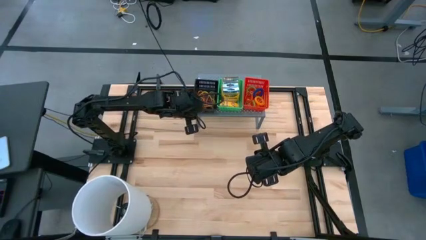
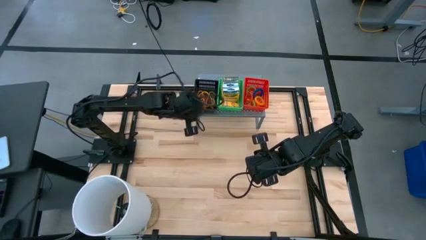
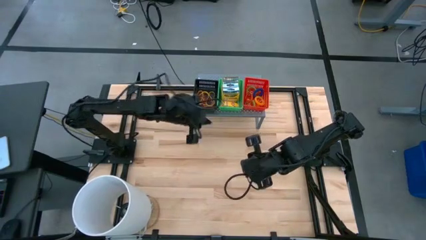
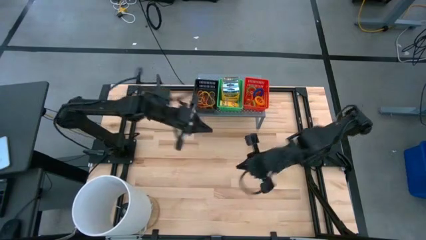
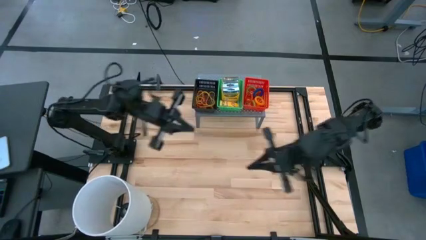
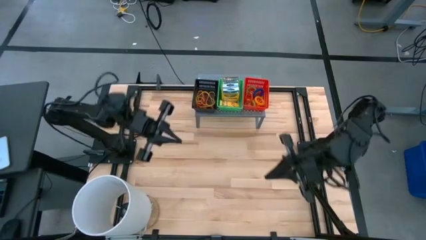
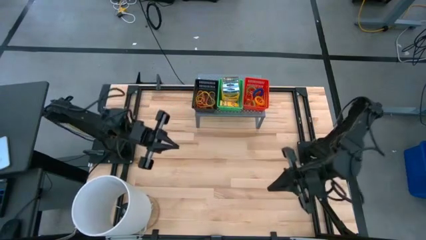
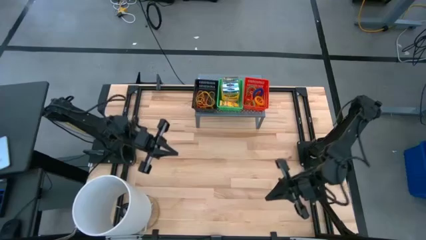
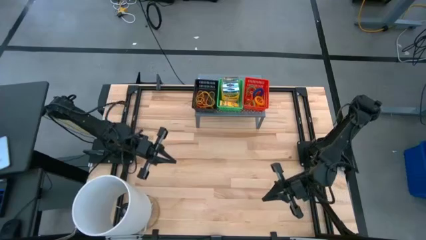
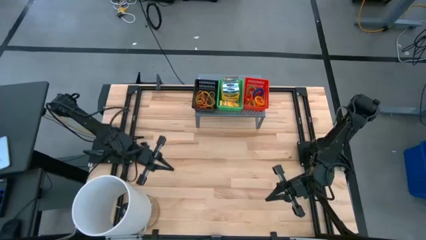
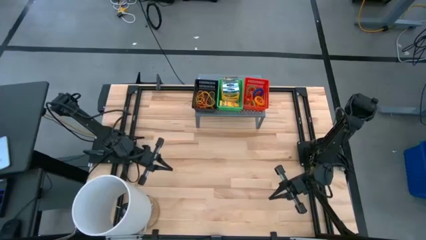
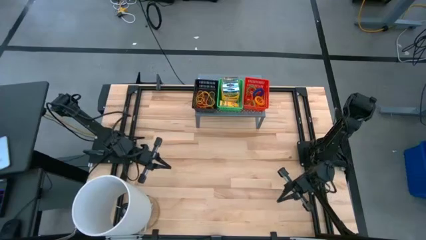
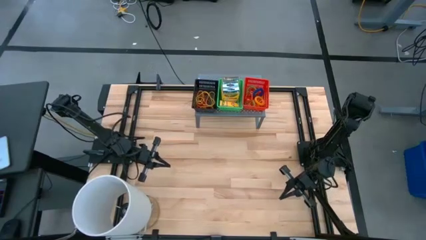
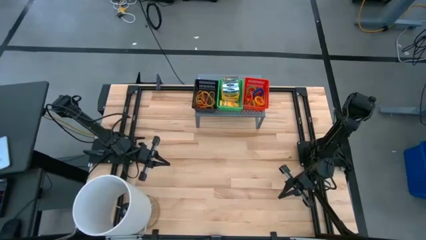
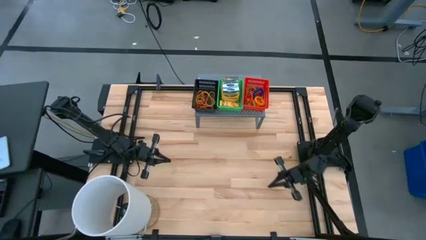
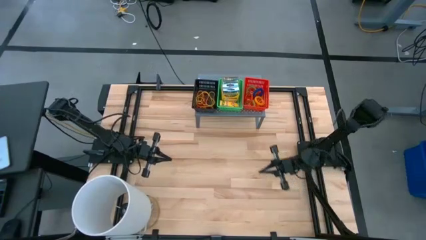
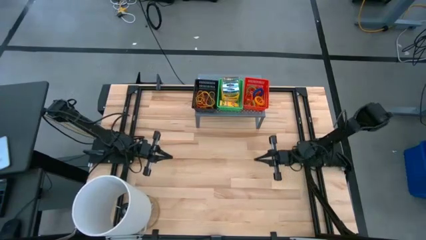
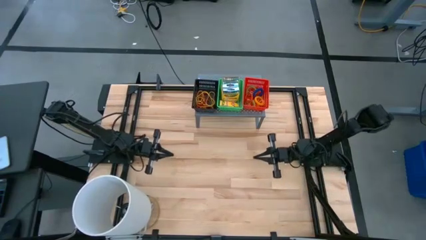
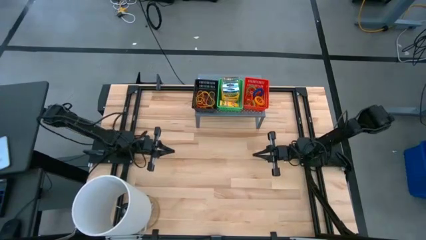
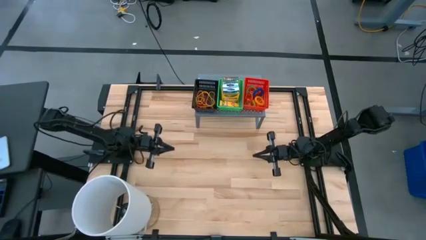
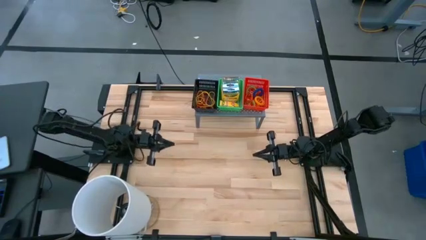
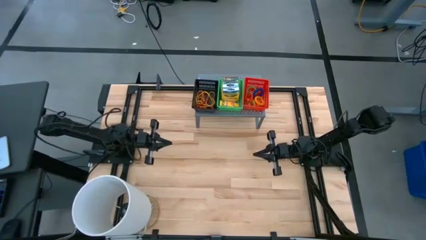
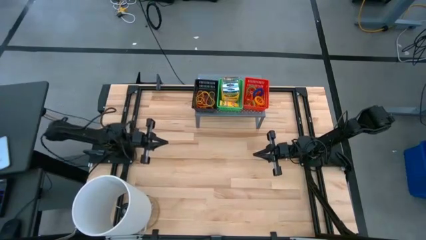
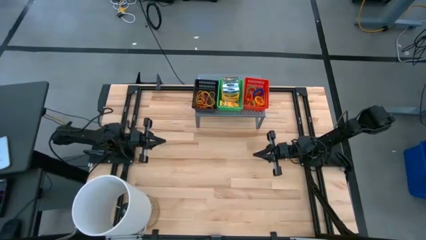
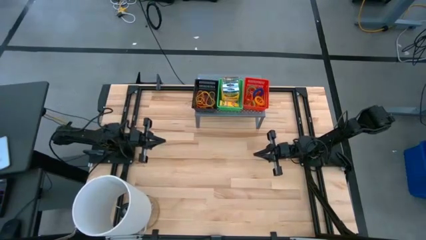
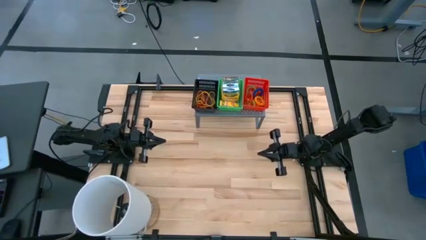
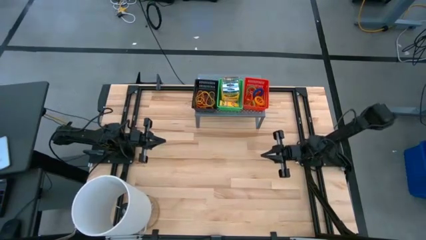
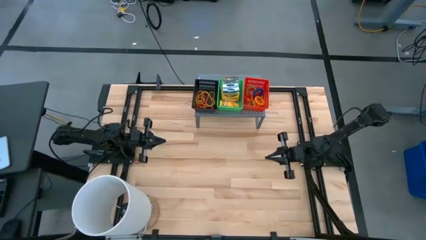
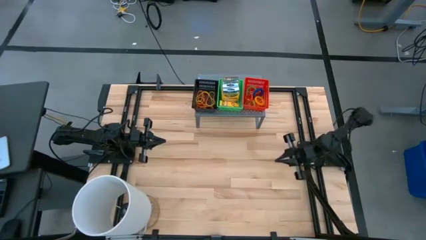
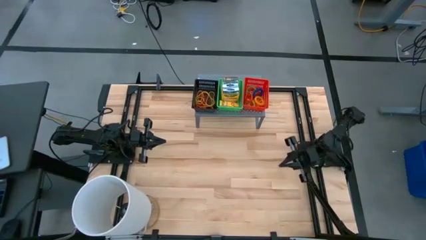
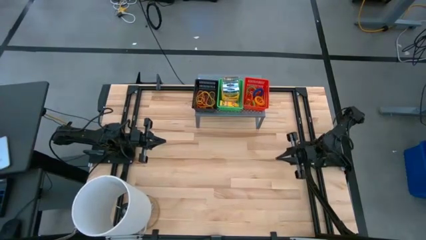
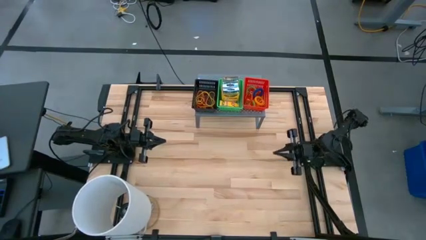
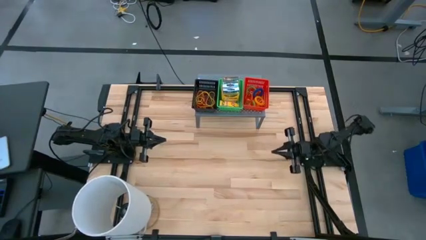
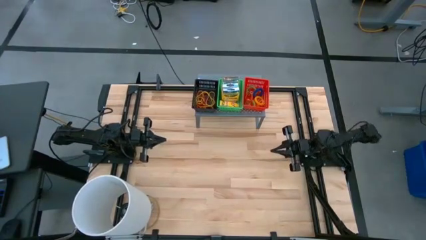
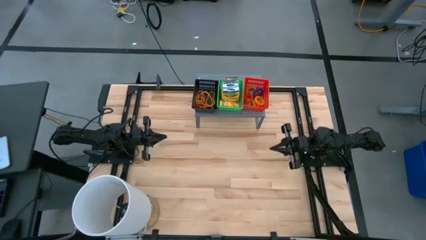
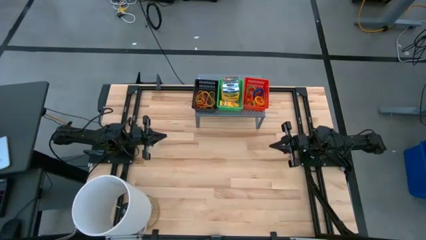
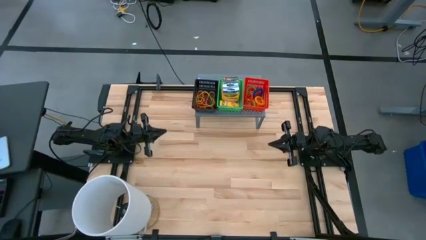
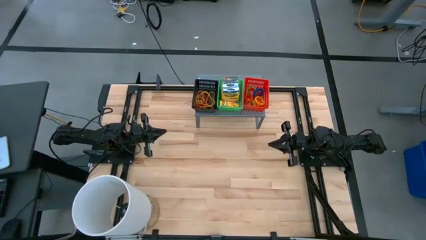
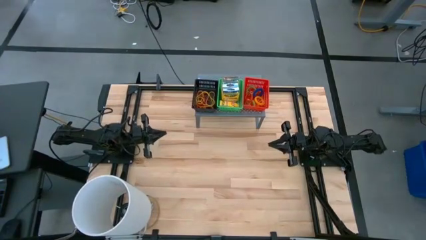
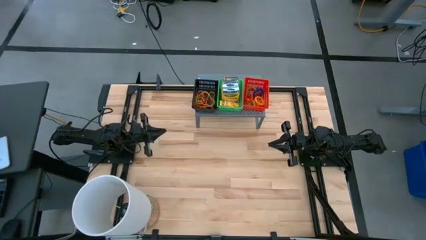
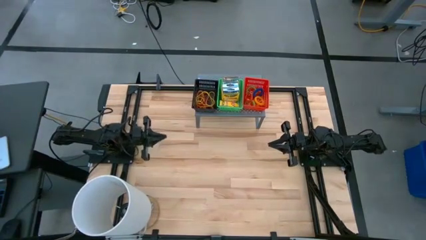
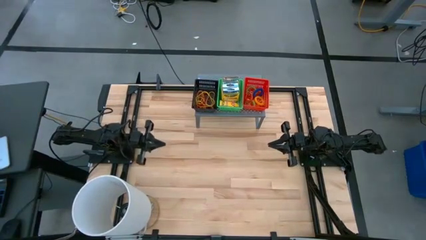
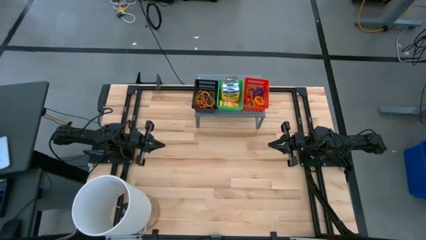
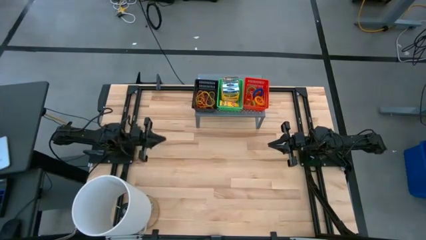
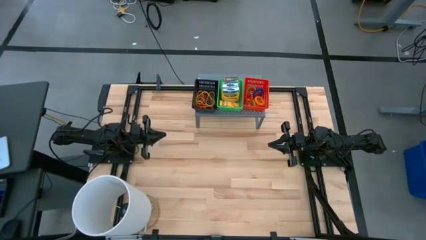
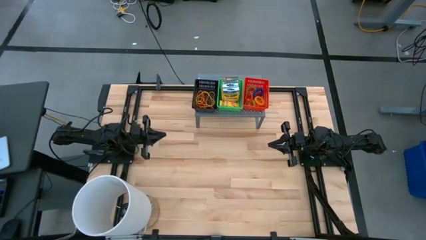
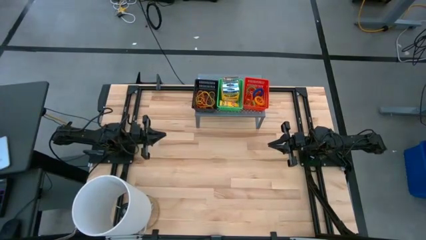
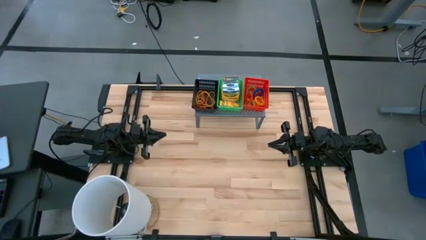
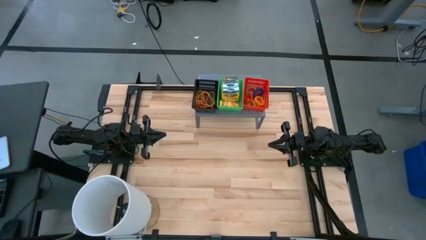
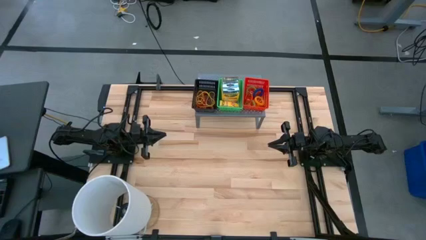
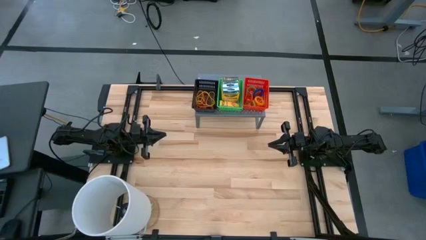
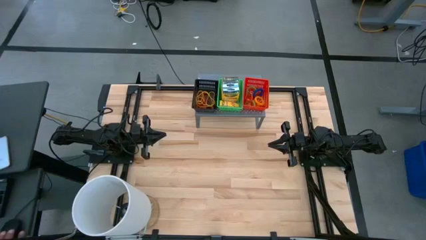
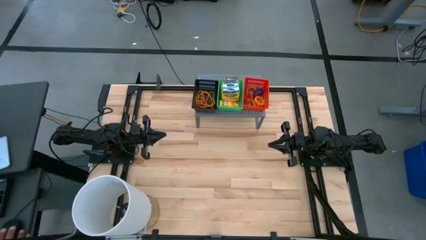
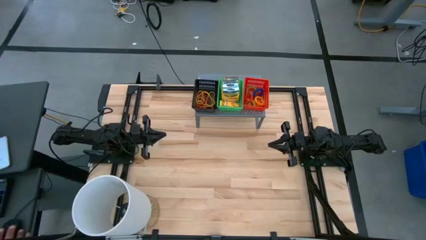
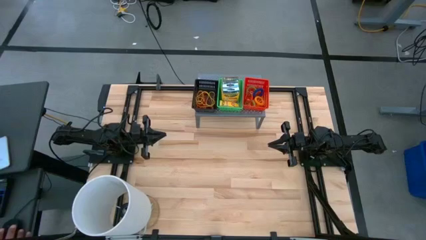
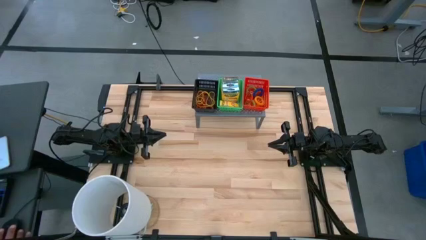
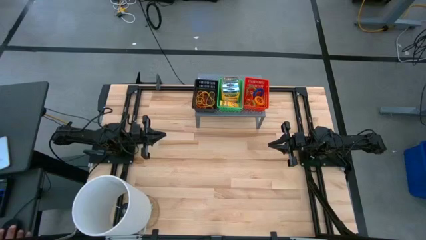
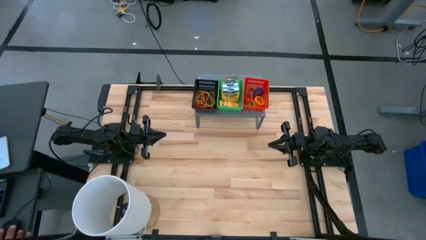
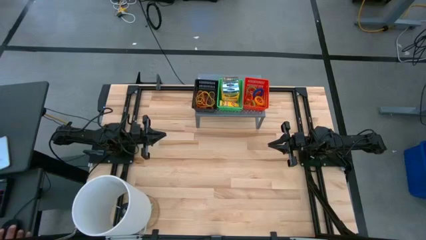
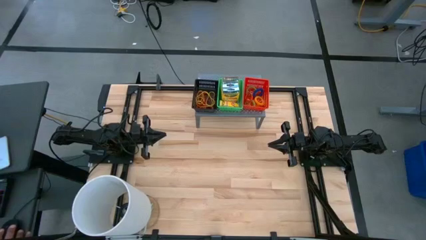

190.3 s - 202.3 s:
Task: Pick & Place Office Desk Supplies
Return to Home Position

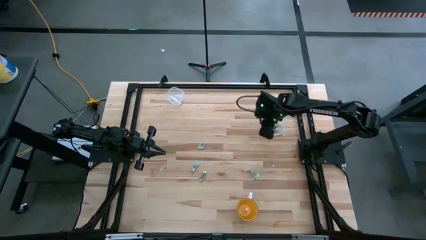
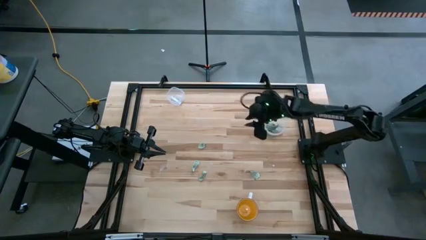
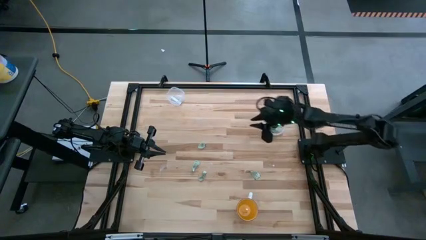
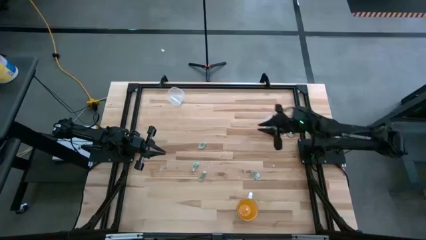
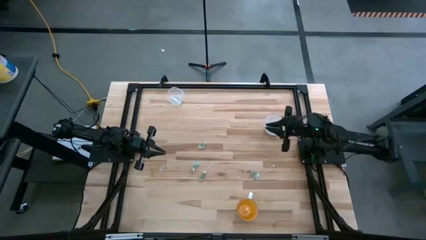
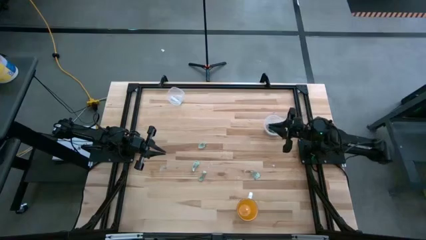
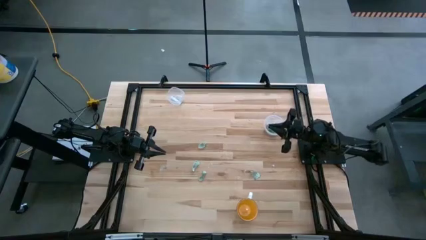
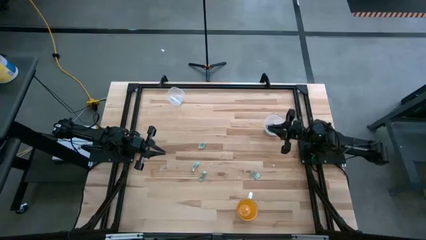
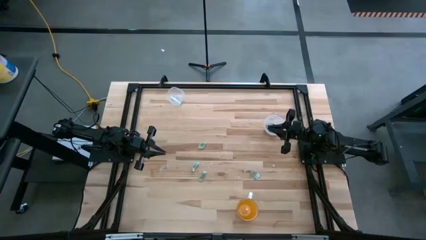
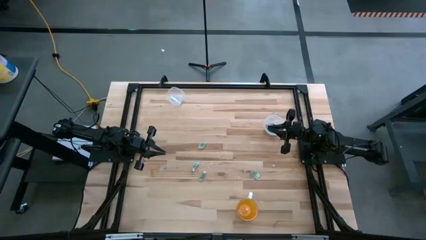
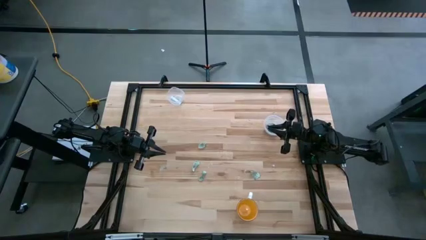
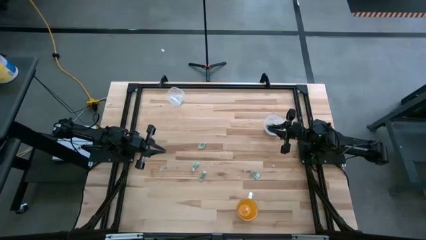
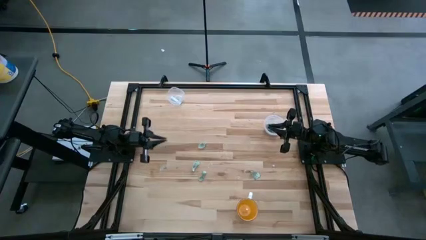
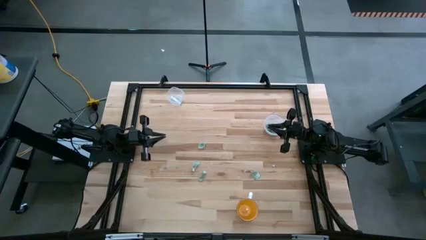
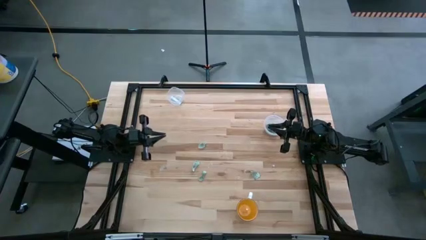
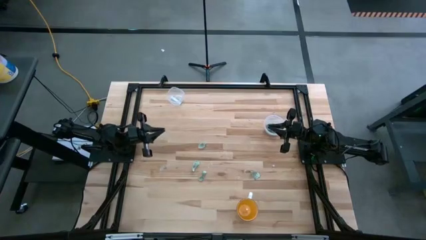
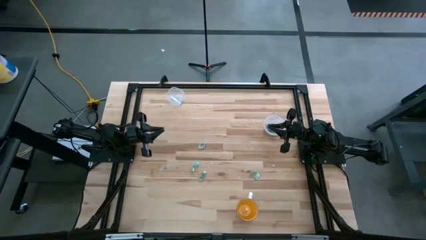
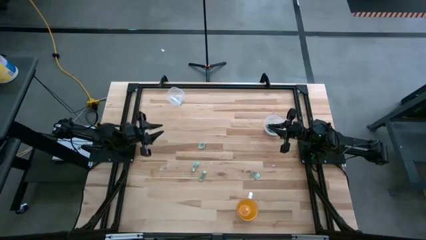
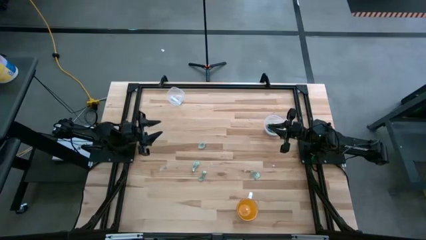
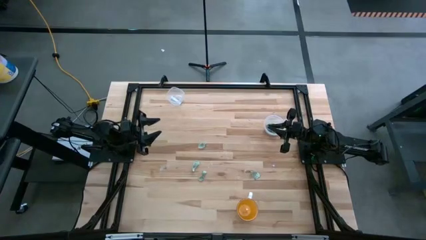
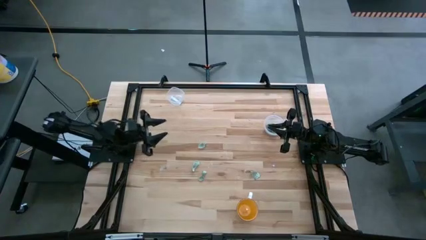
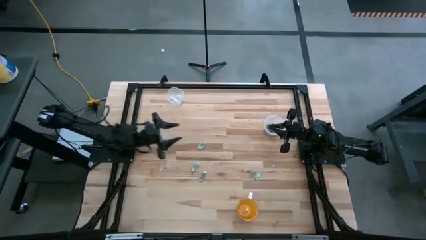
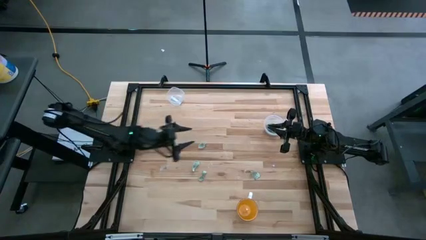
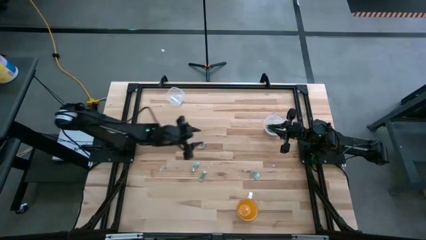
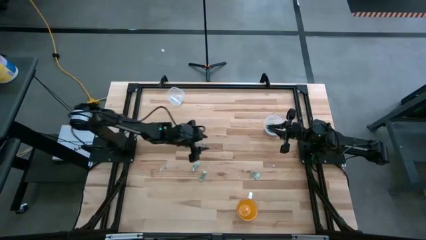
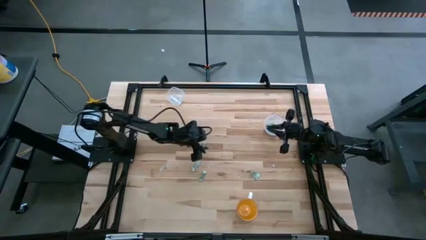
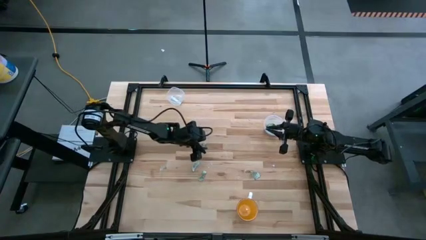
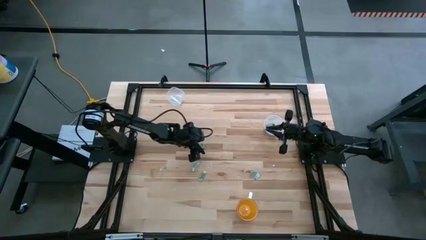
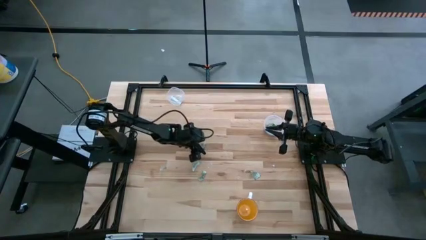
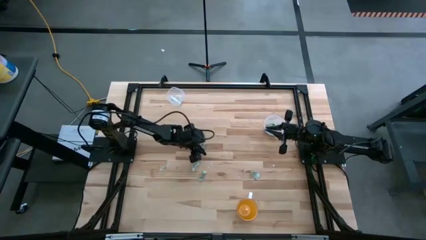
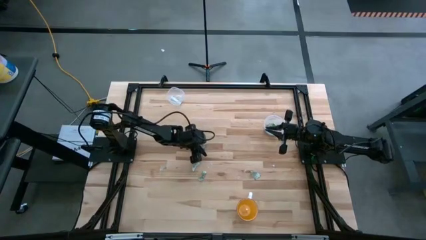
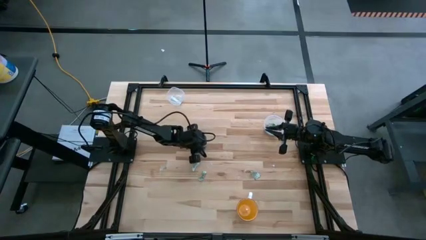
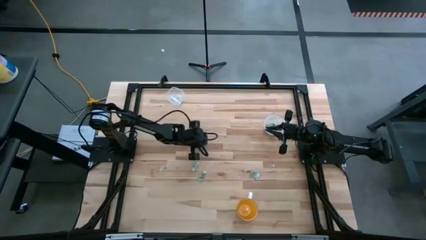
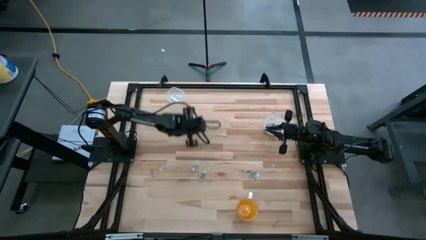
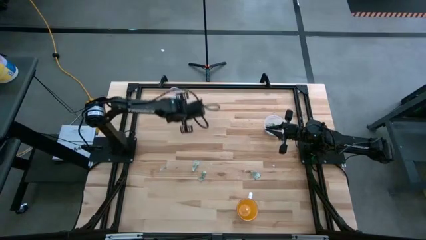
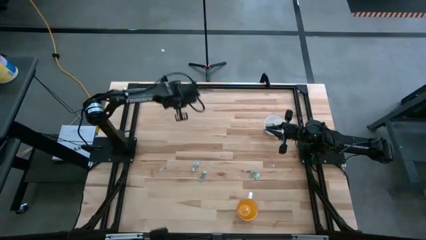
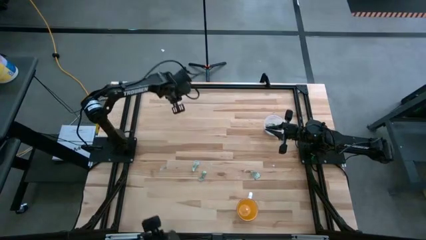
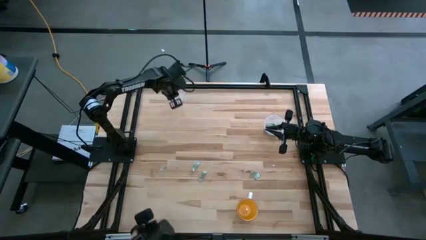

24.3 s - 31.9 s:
Task: Pick and place items into bin
Put the stevia packet into the top transparent bin
